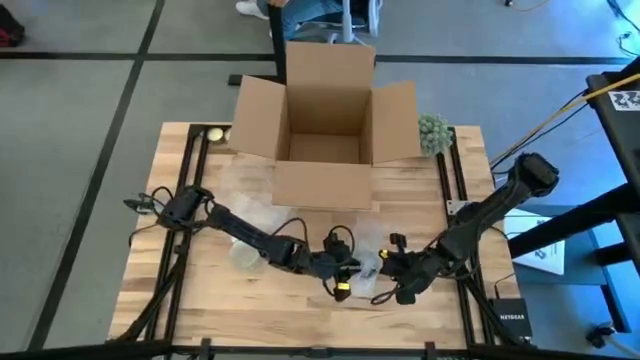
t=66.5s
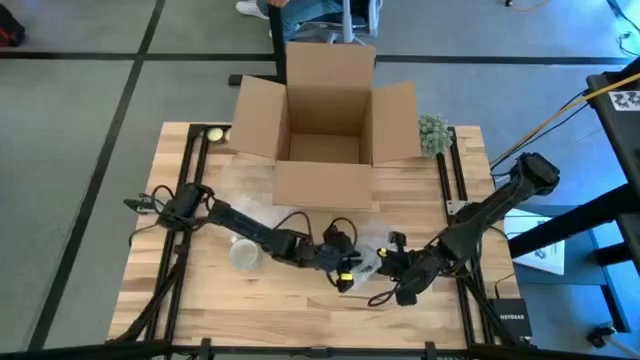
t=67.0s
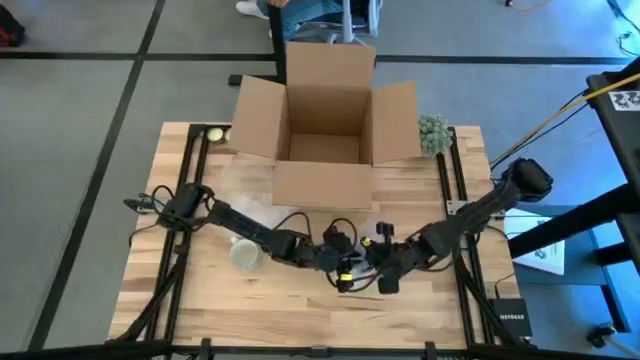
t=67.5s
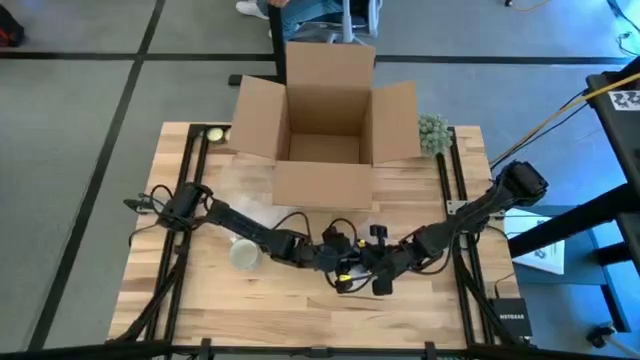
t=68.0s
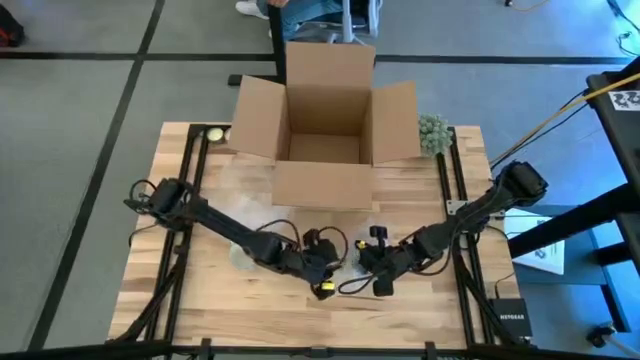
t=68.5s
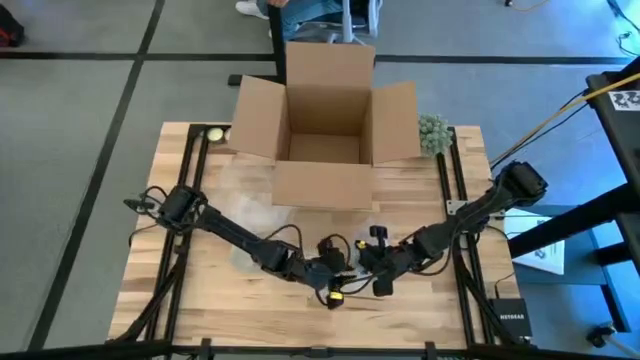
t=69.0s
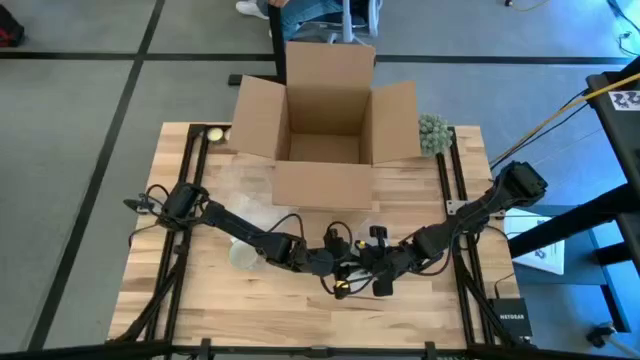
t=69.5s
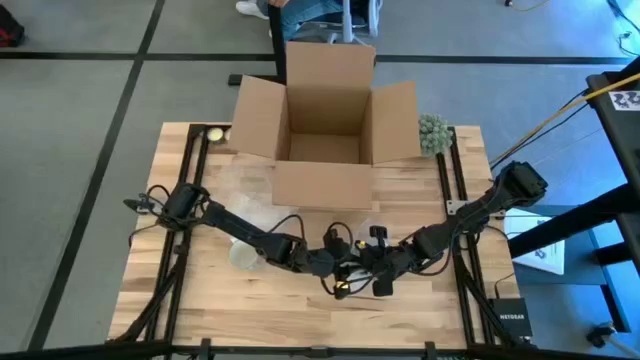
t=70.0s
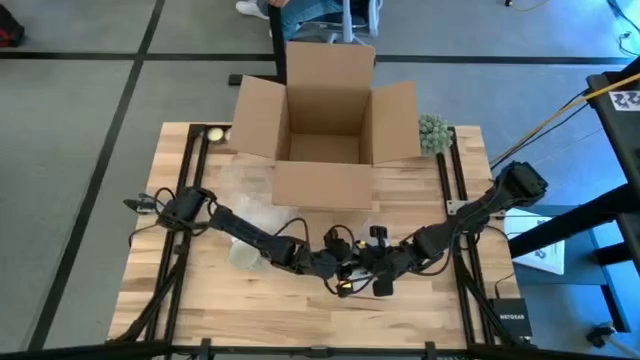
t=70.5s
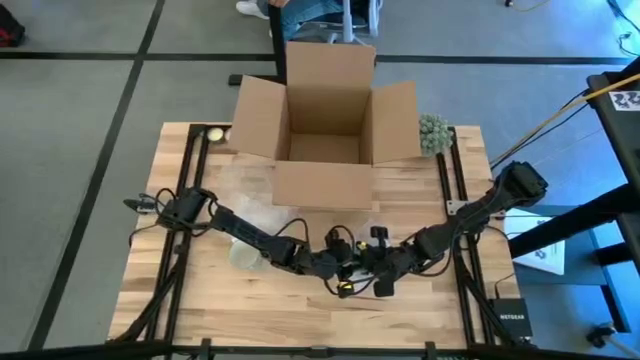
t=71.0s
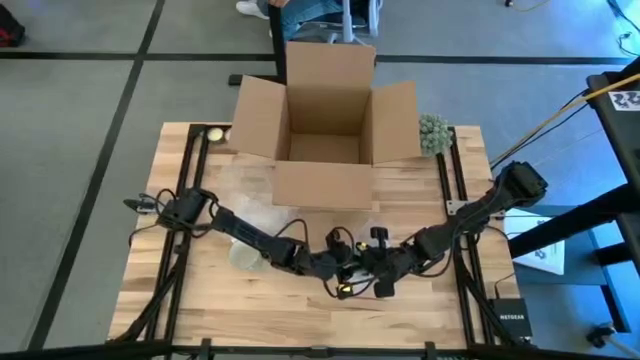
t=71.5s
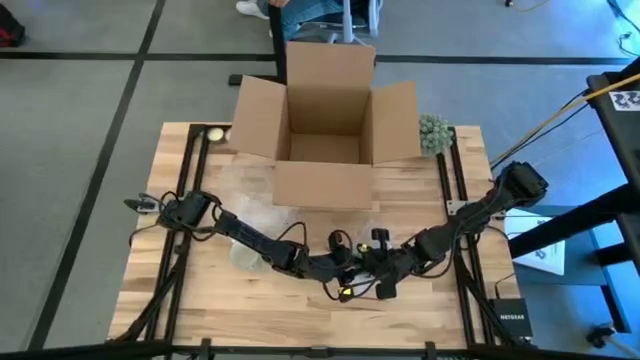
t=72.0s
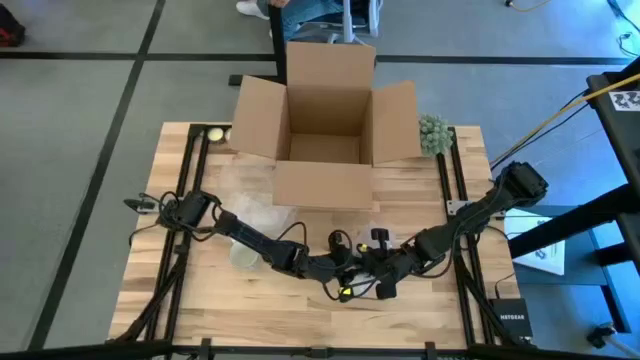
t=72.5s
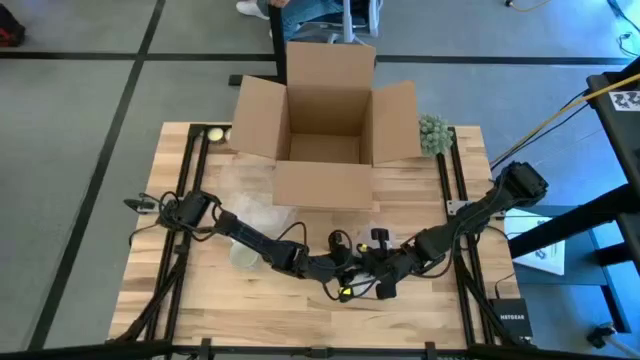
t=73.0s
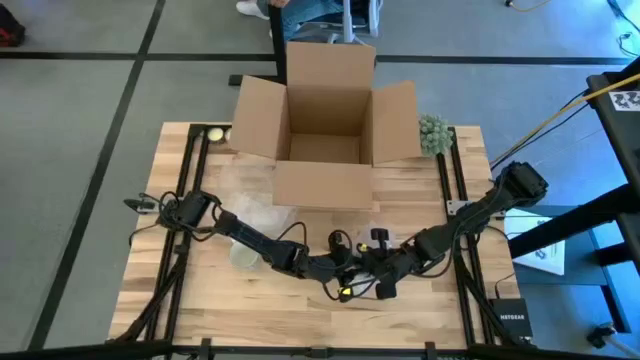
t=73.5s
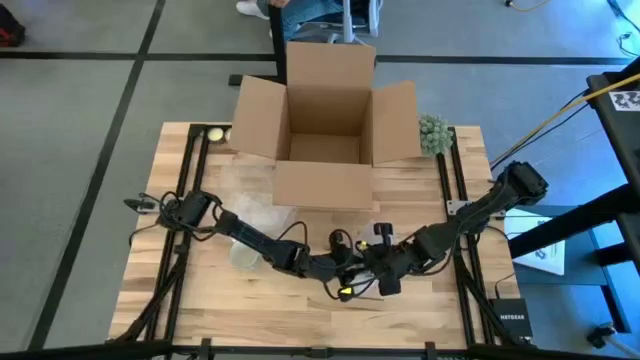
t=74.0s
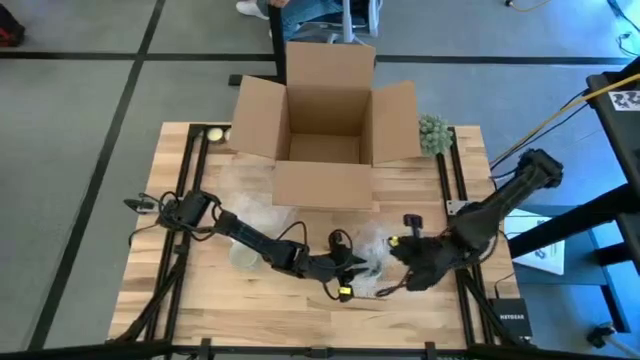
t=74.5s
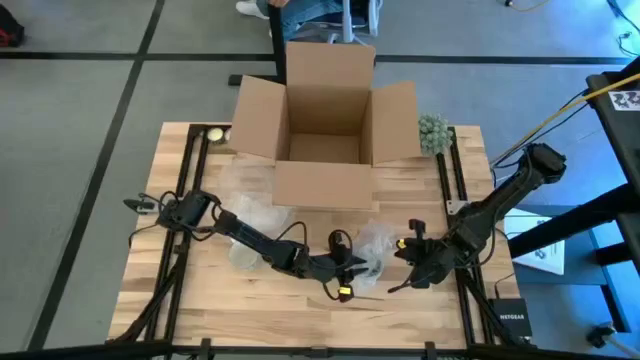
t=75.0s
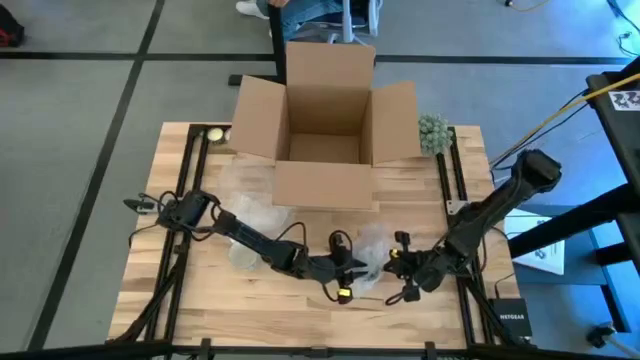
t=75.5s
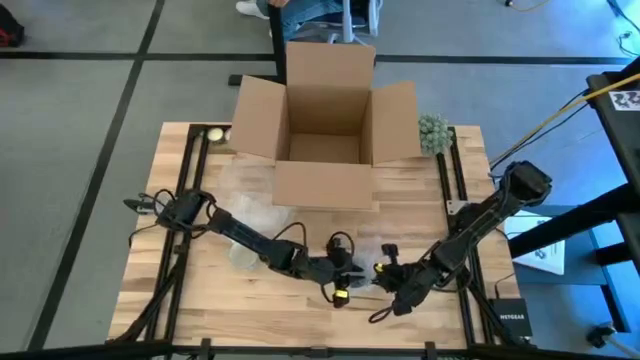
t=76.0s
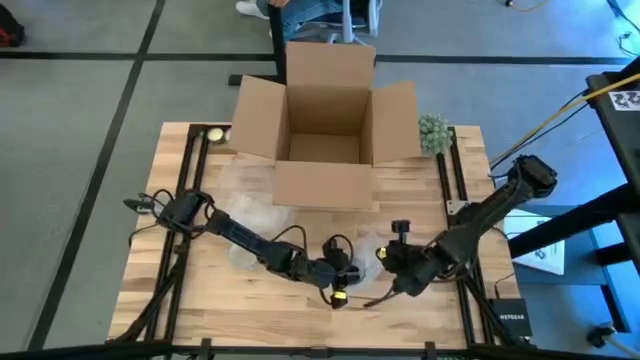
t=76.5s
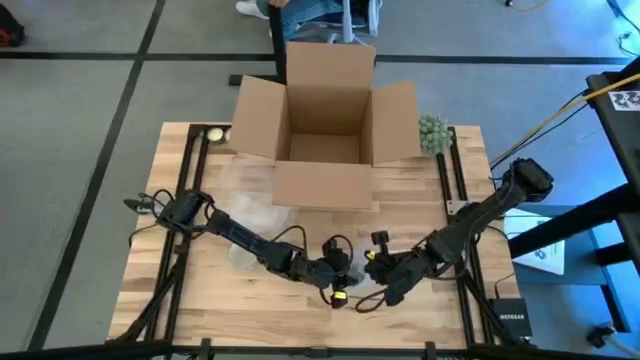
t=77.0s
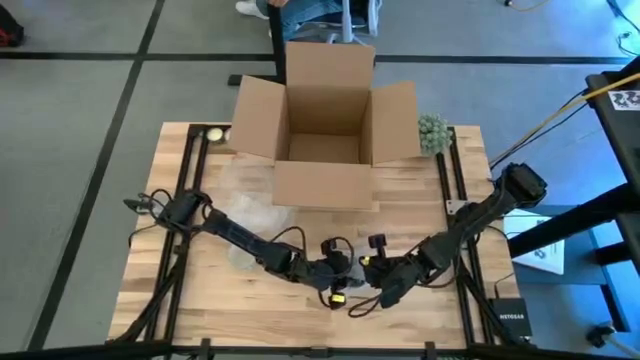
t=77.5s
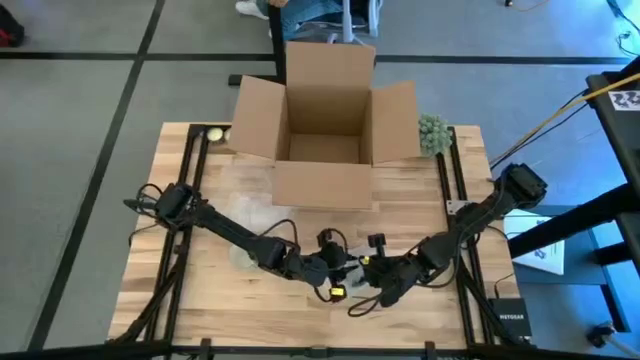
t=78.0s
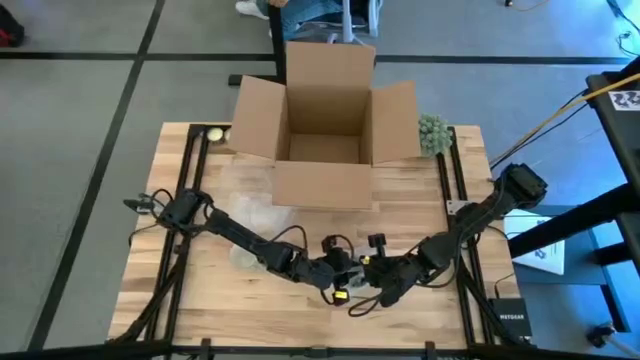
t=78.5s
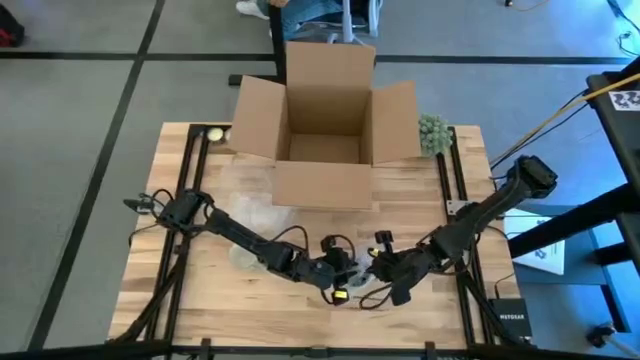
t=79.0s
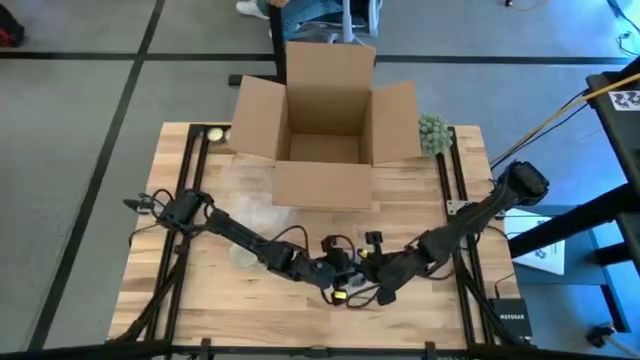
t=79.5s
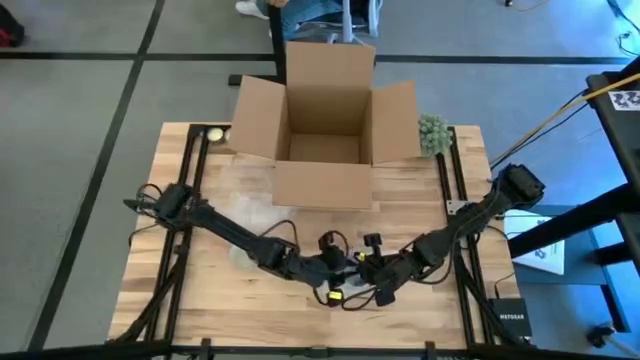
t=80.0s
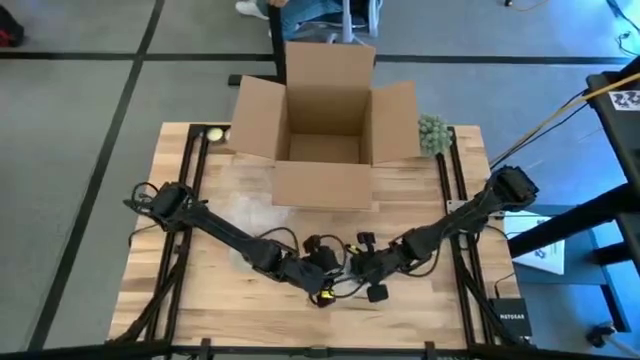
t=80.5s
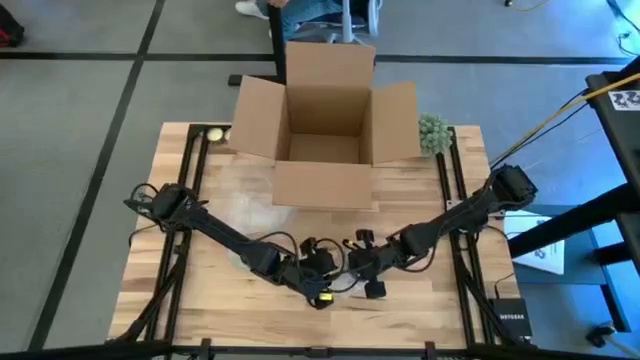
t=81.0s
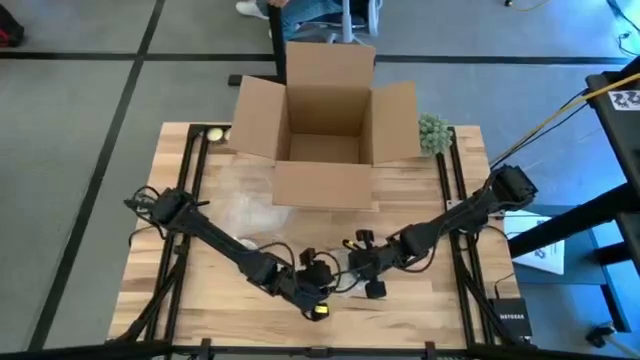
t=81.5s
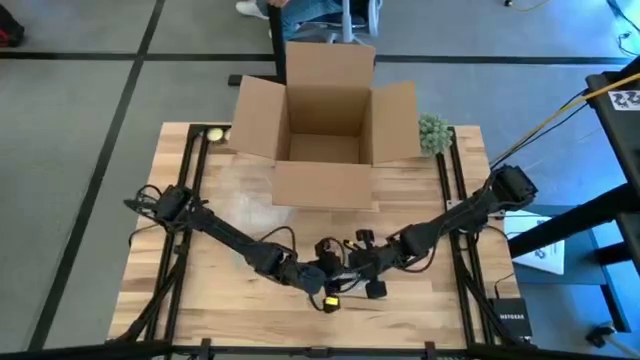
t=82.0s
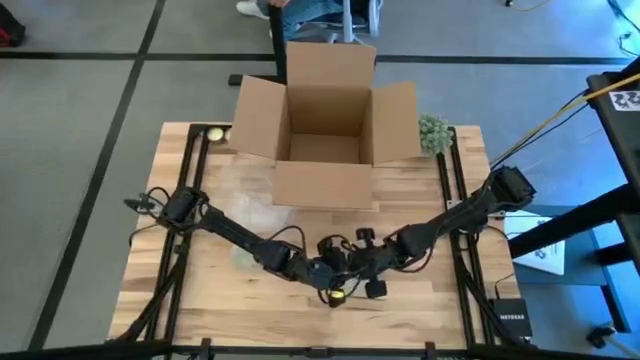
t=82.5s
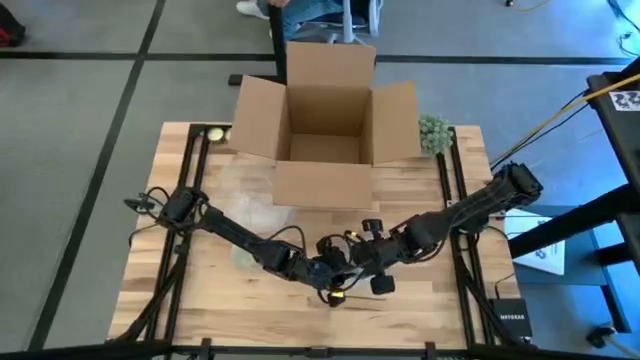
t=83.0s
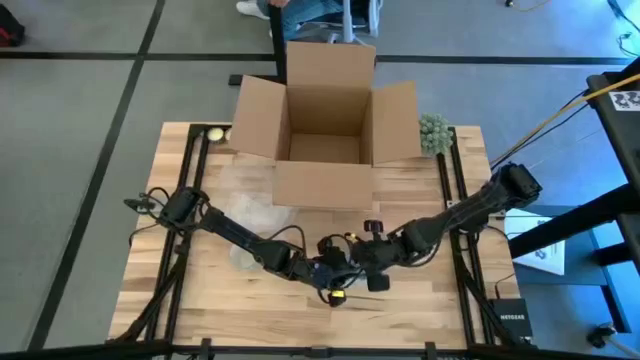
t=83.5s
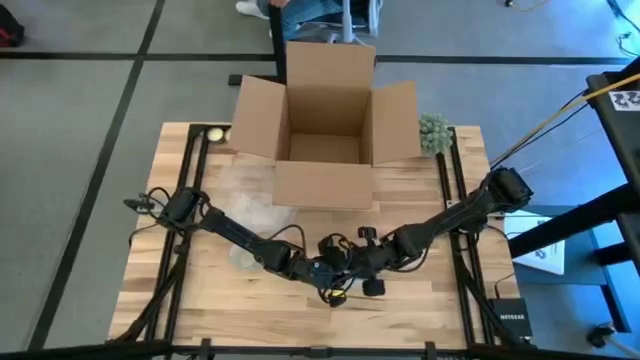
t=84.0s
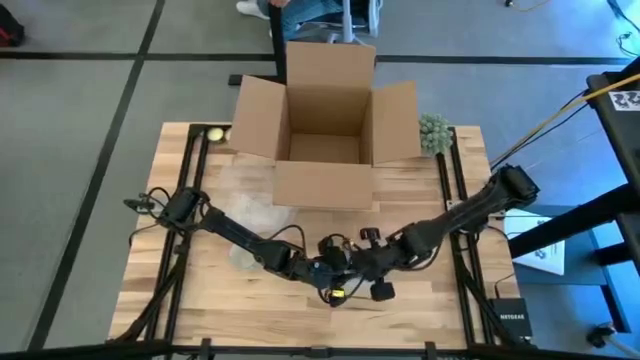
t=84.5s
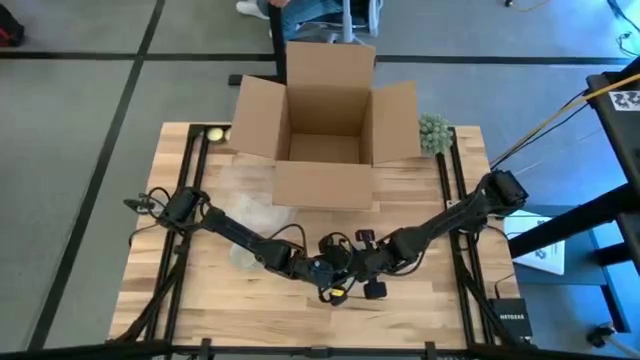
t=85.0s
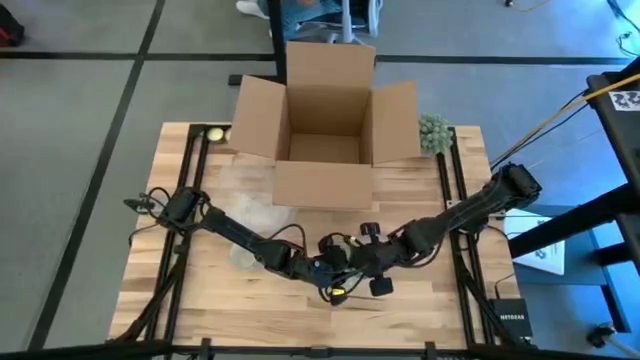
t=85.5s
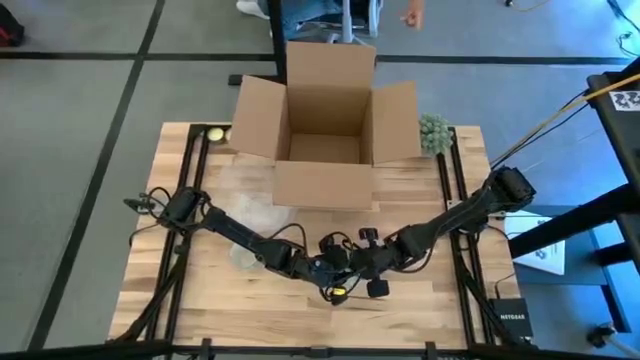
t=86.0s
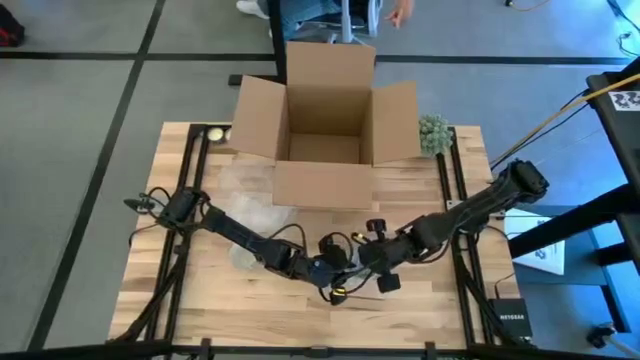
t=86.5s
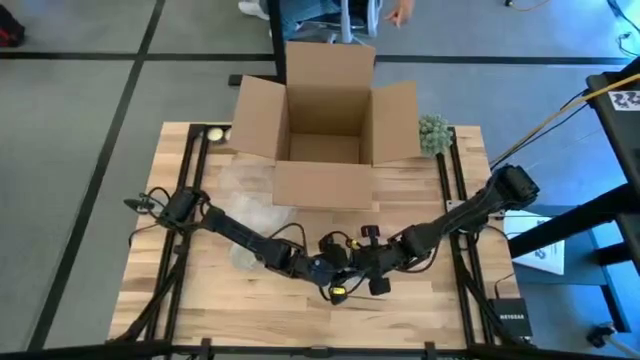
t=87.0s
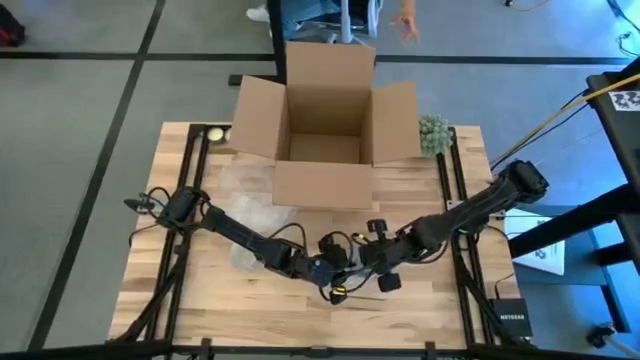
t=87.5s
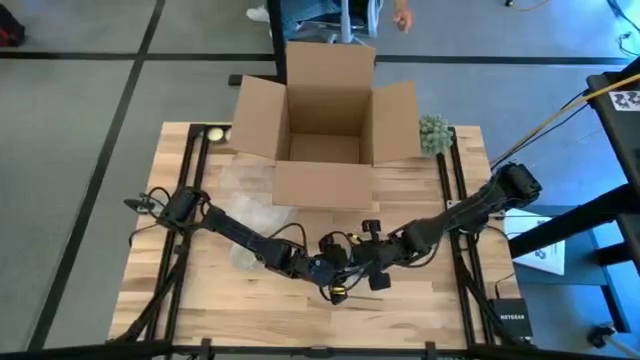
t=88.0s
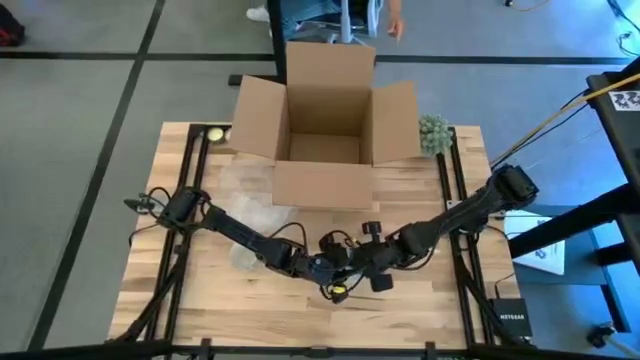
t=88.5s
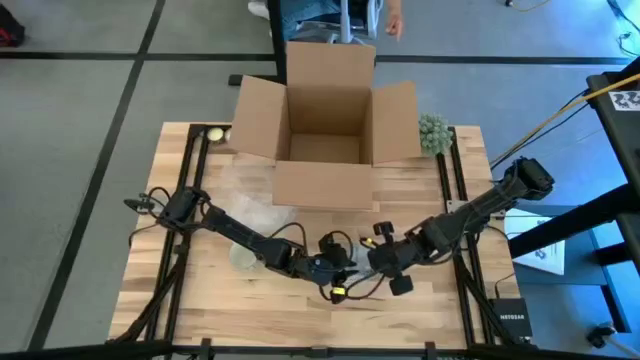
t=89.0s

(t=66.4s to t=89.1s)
Task: wrap mug
Wrap the green mug with the bubble wrap
